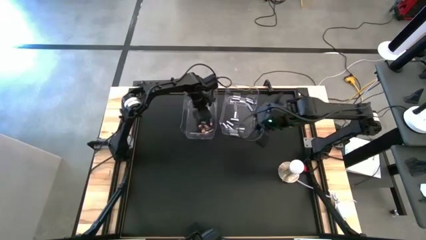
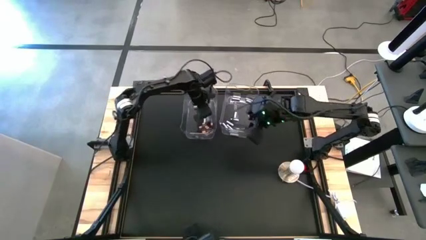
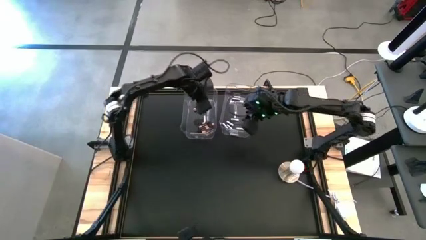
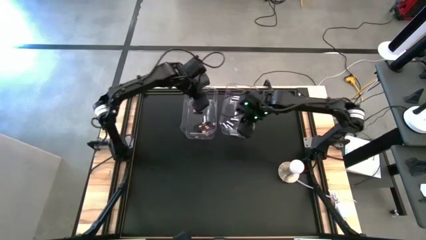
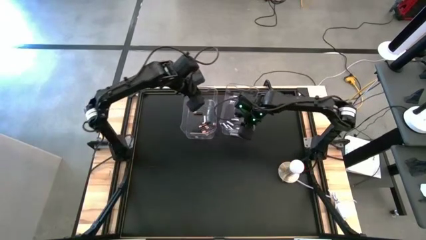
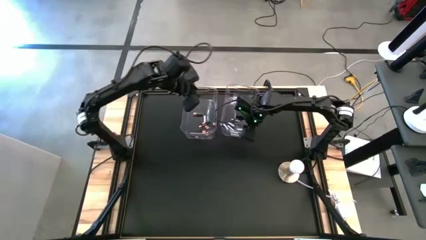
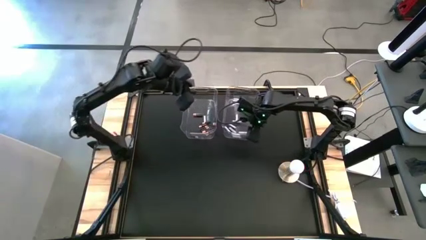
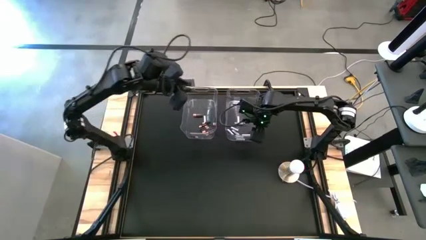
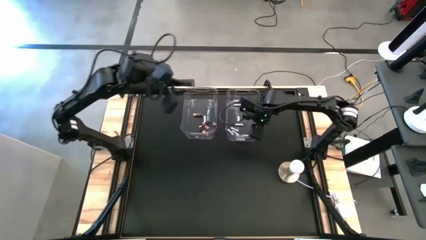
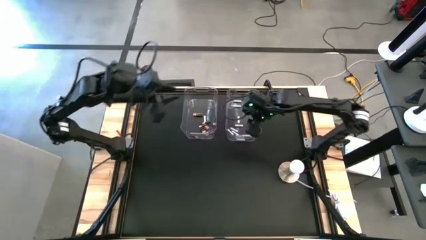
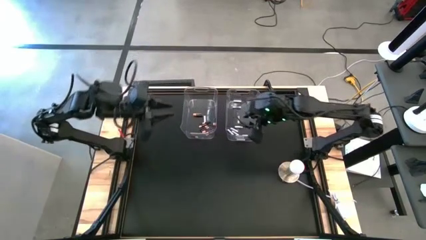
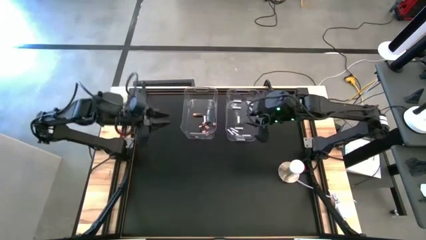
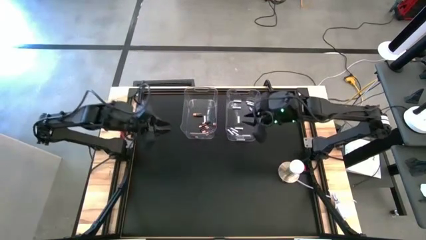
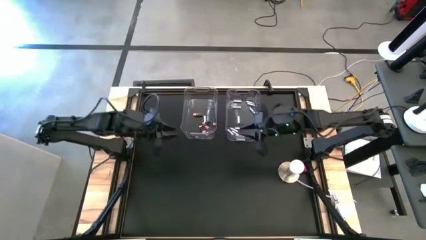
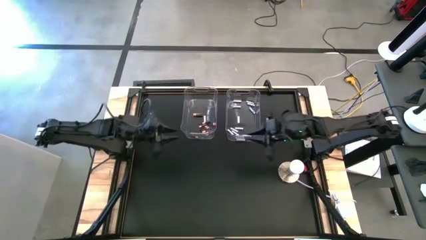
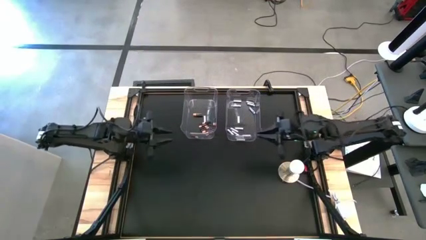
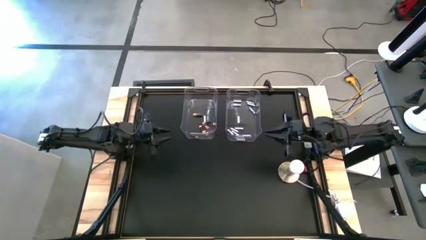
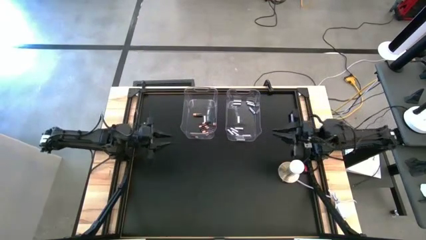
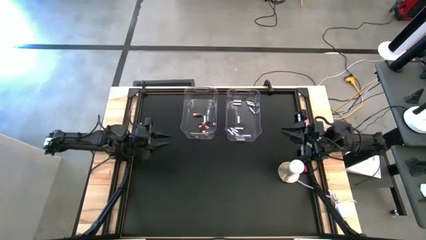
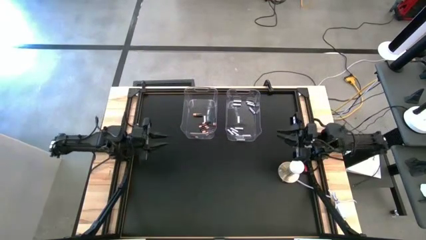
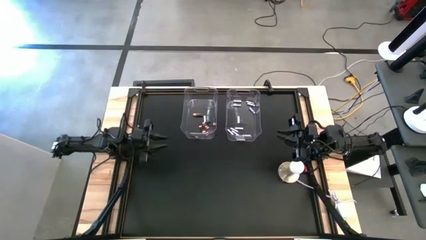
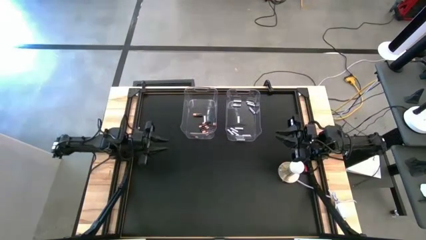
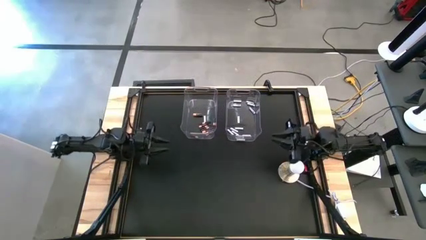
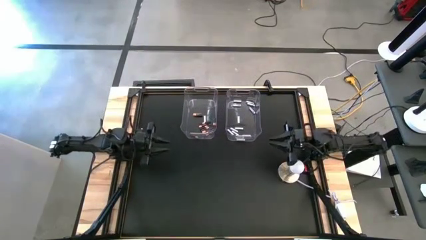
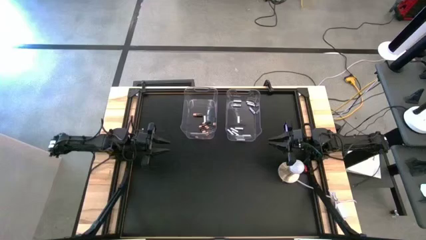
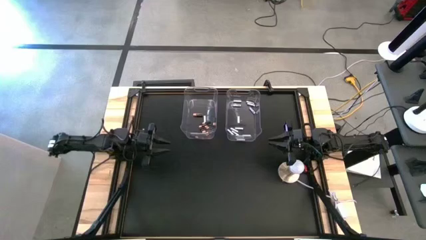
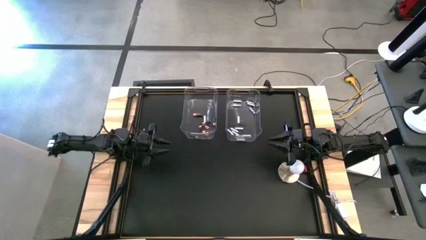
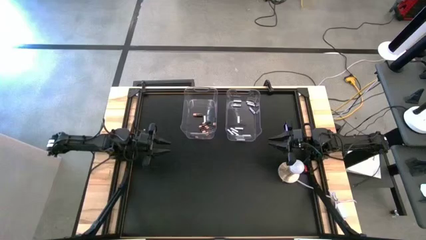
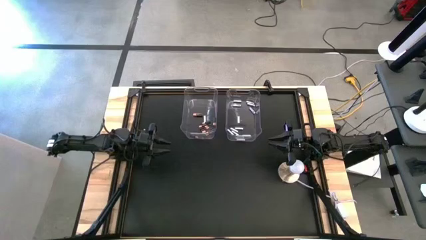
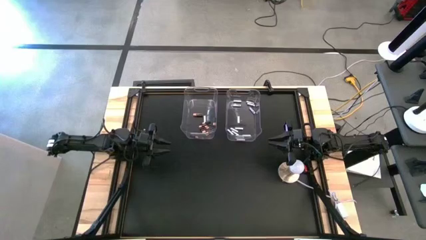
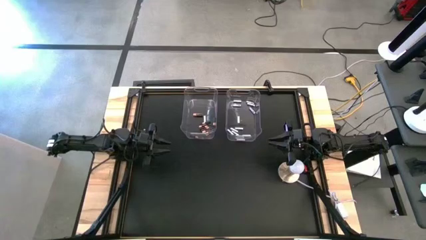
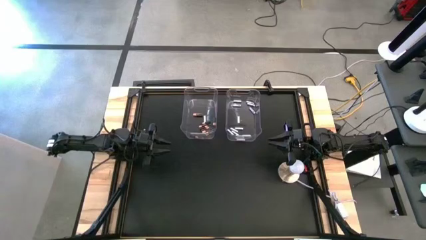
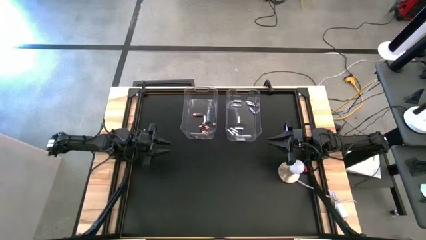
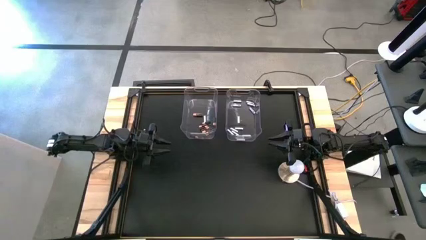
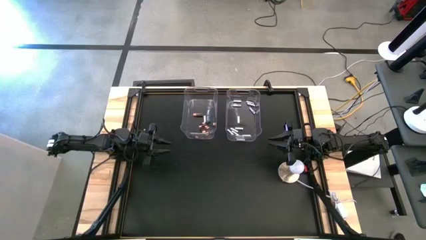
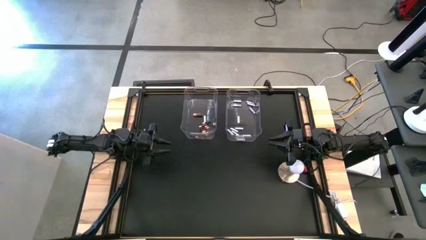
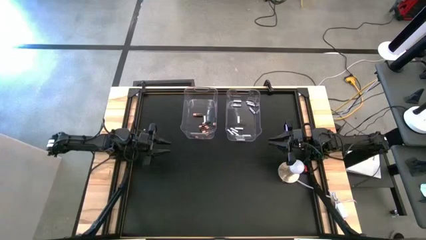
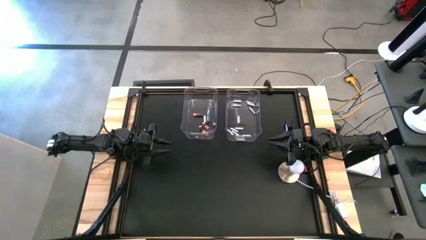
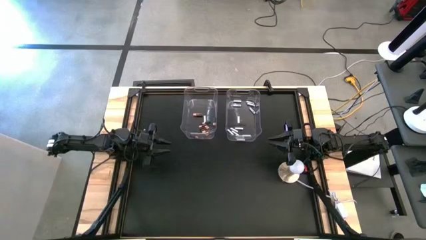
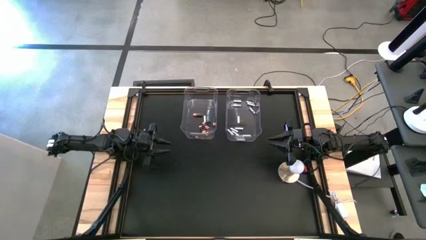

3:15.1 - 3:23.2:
Task: Sort batteries
Return to Home Position

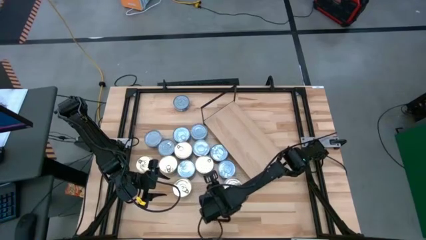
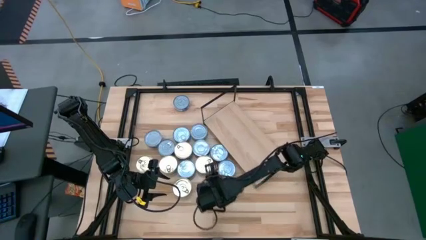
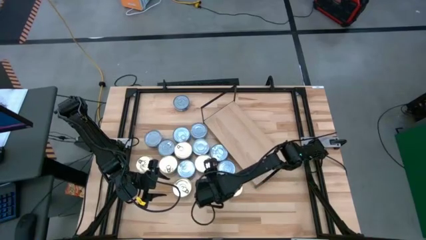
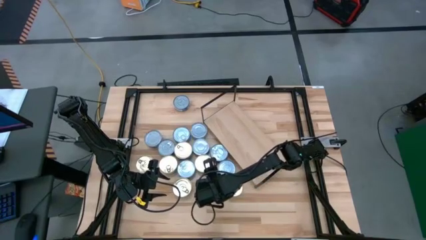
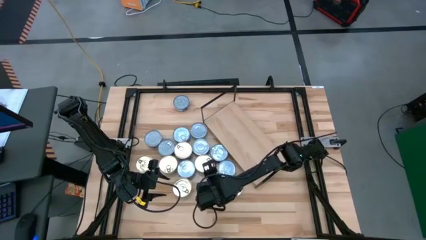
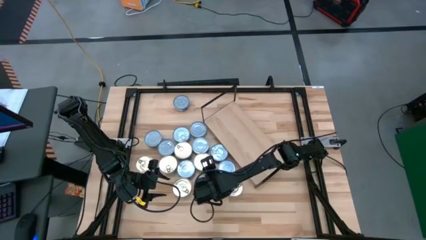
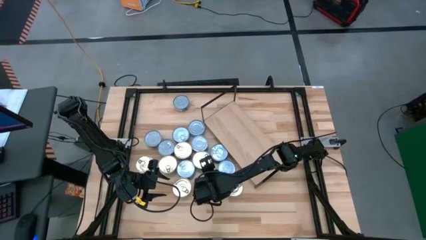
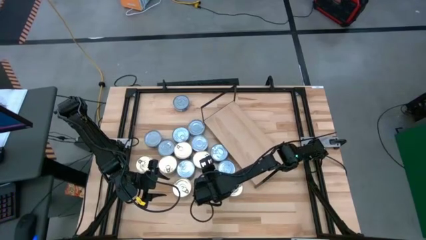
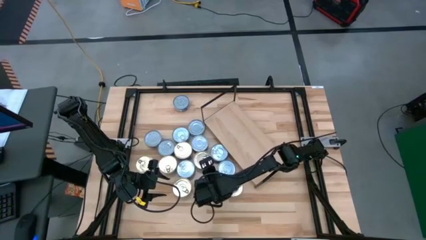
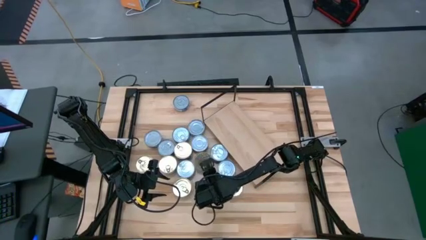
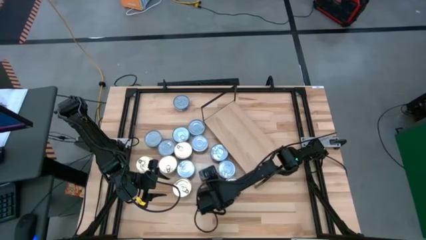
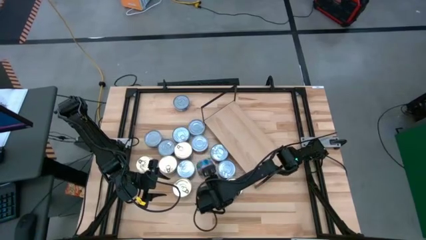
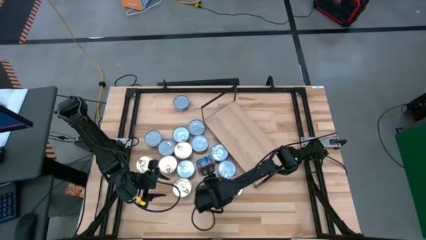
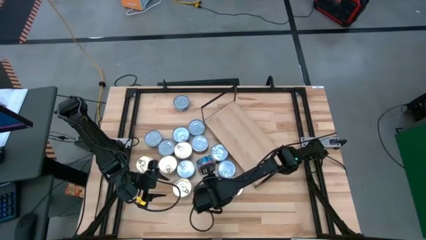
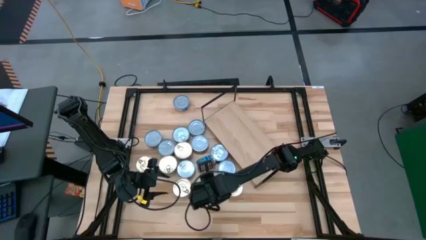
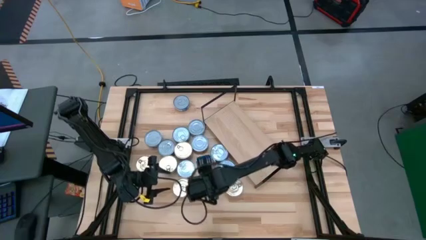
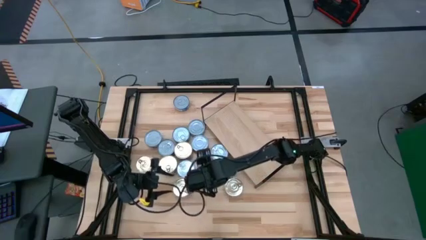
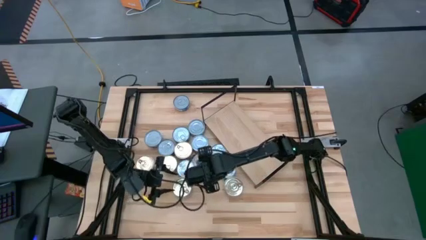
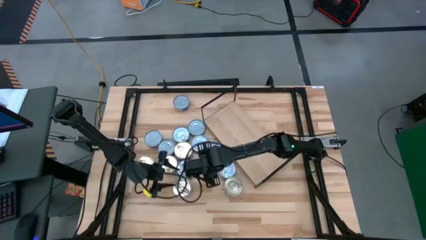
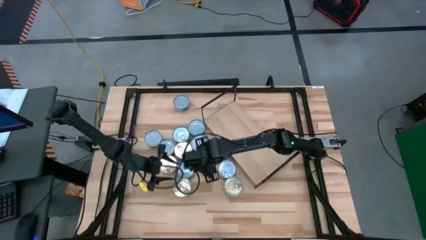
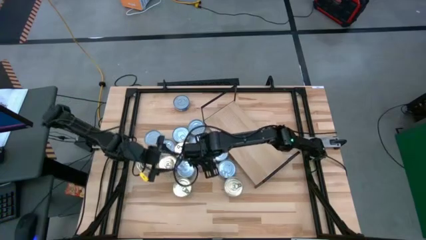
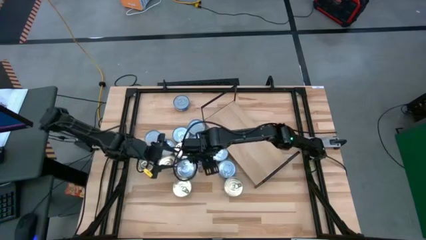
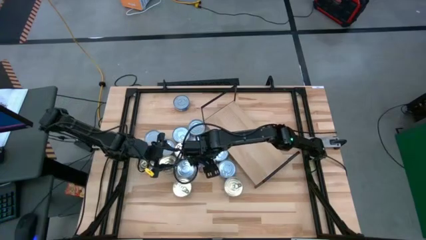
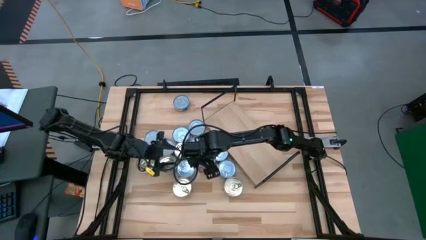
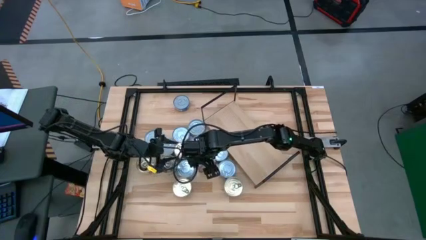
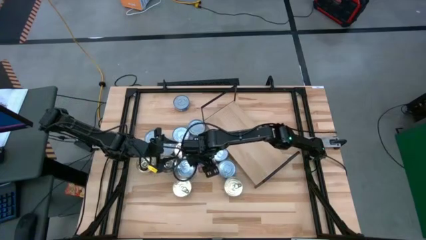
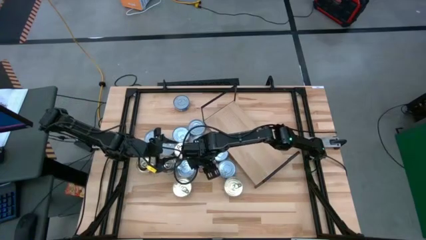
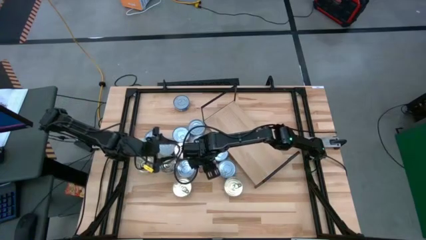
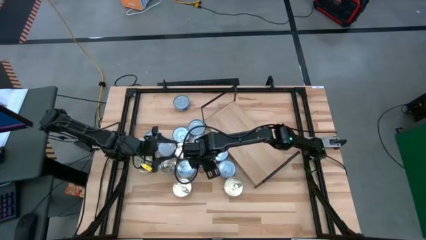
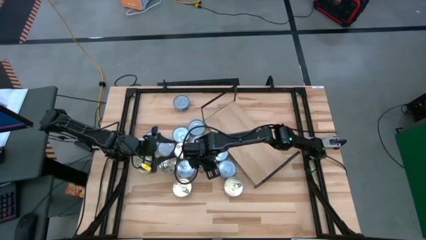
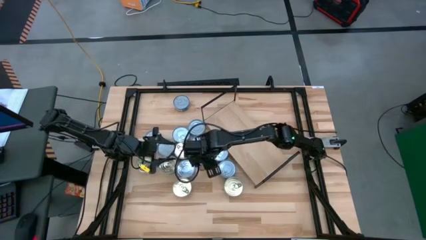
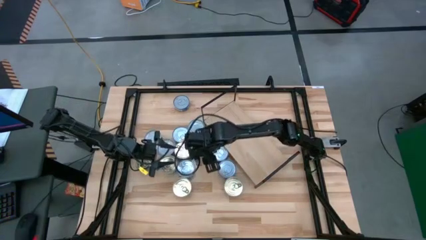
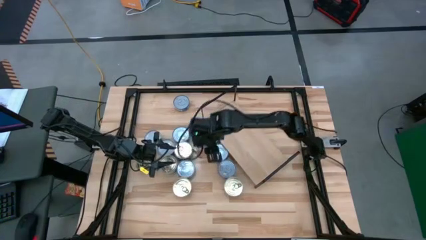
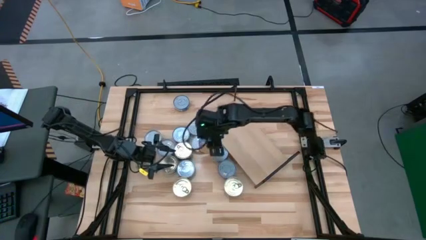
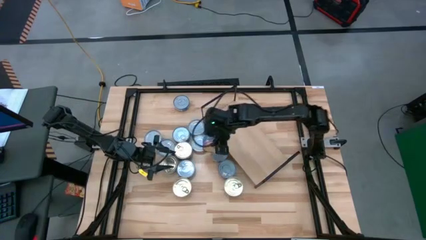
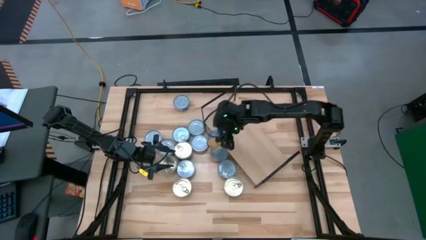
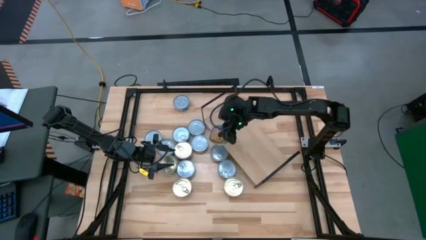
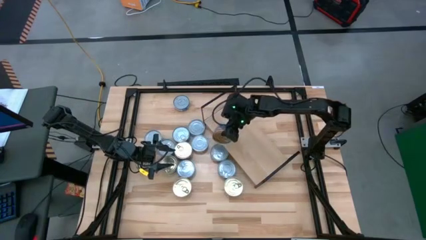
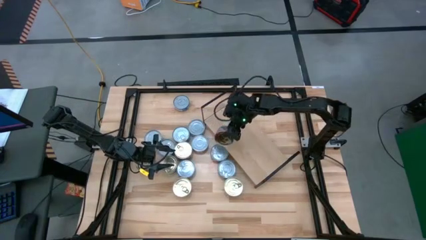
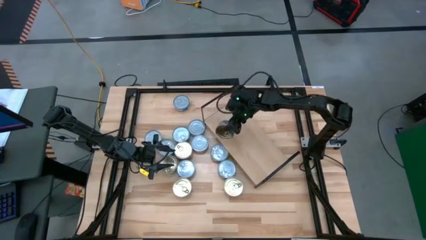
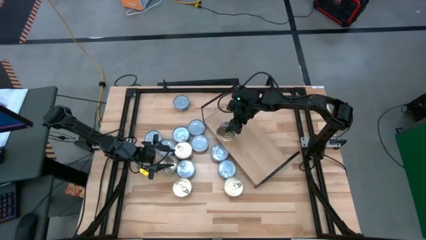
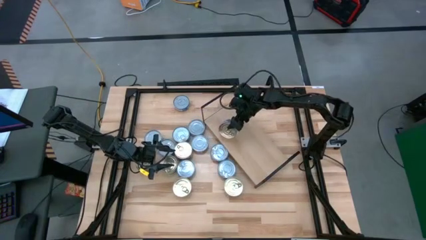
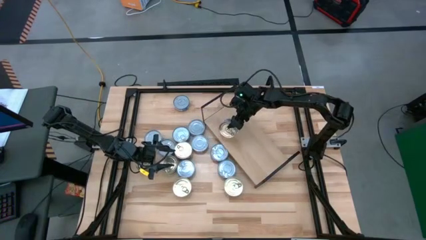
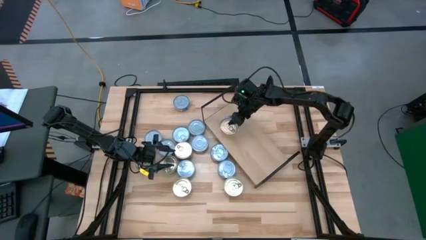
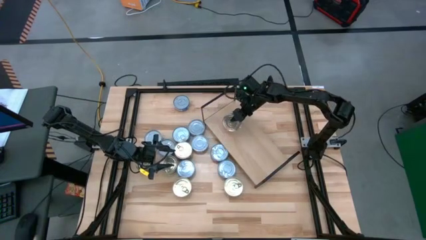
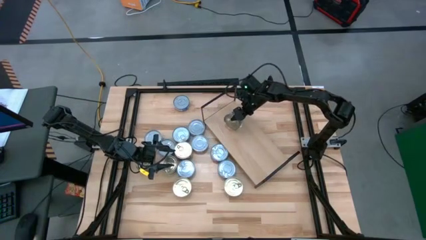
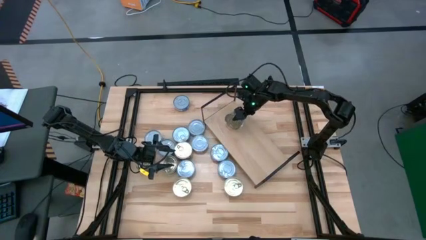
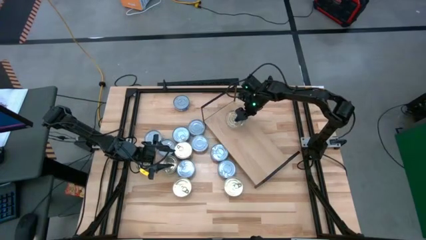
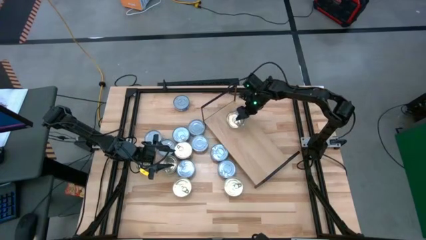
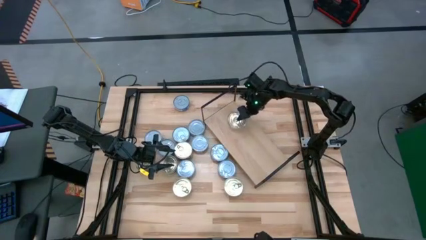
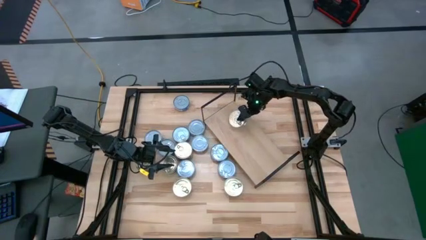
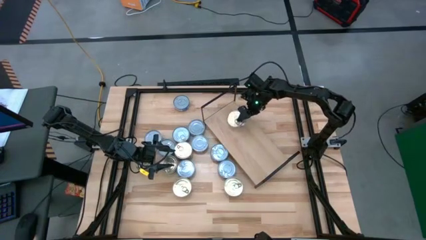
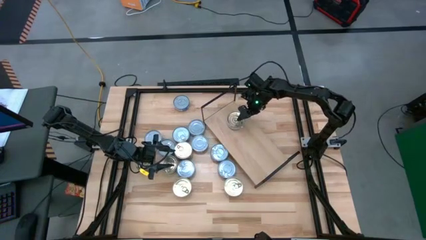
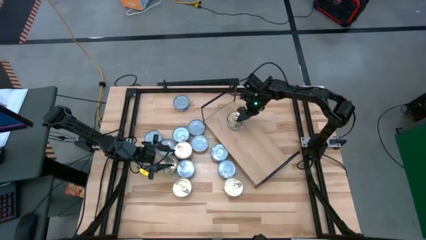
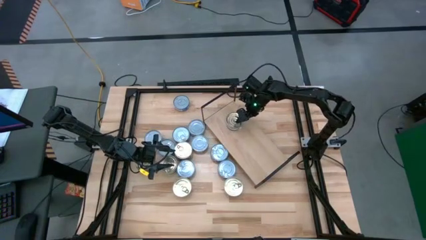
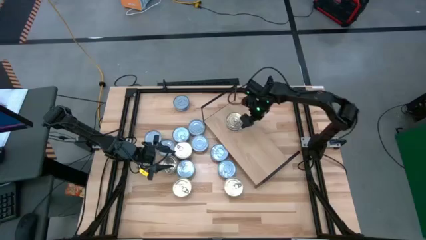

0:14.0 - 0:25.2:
Task: Stack canned seafood by type on shelf
Put the blue tuna can on the shelf
